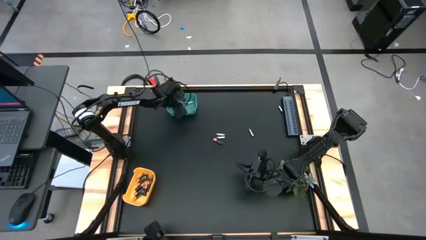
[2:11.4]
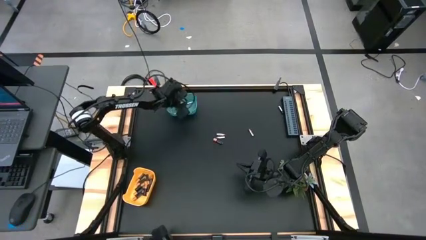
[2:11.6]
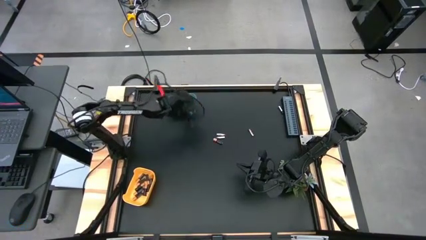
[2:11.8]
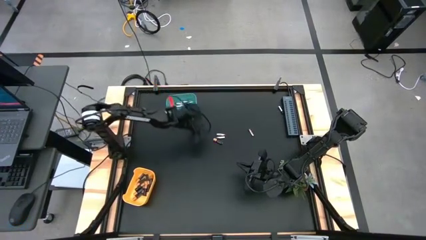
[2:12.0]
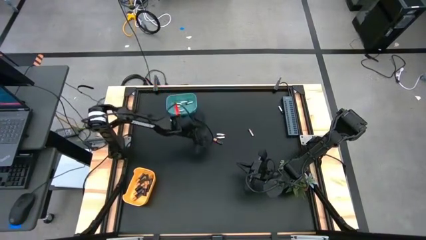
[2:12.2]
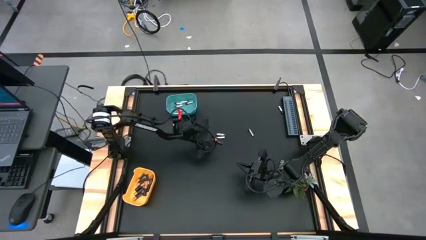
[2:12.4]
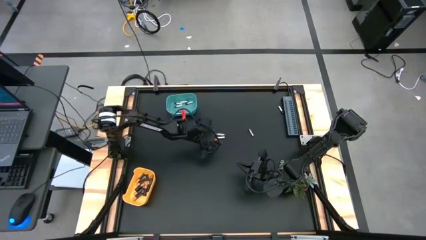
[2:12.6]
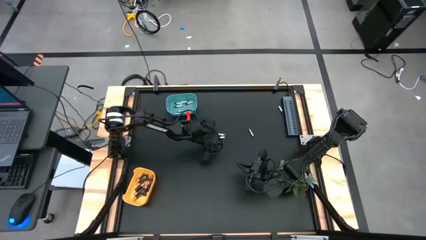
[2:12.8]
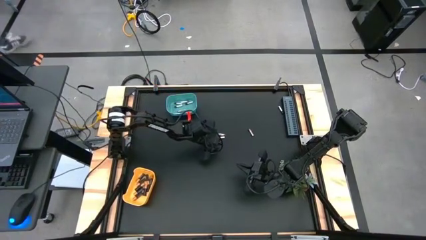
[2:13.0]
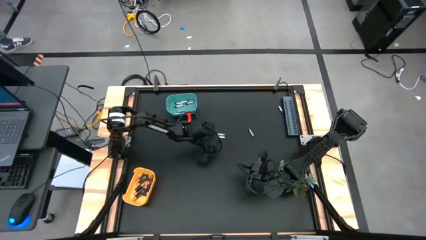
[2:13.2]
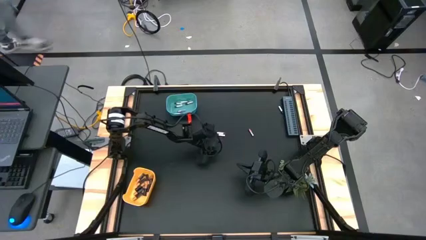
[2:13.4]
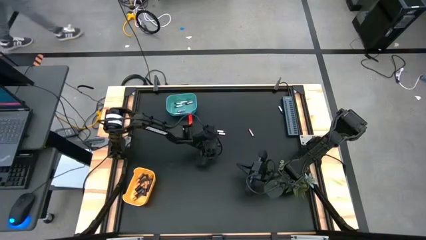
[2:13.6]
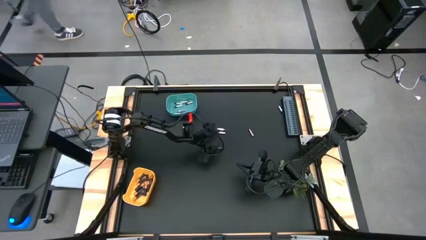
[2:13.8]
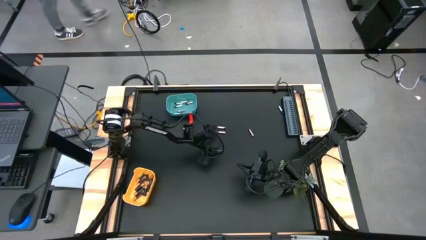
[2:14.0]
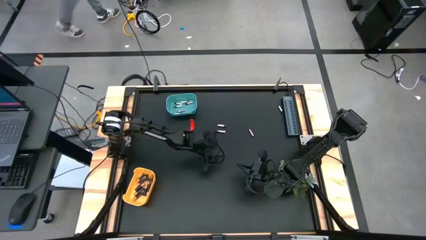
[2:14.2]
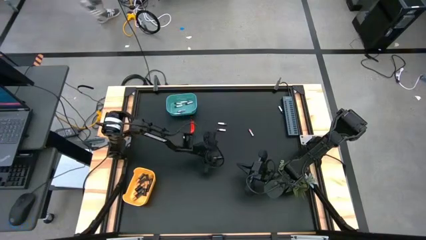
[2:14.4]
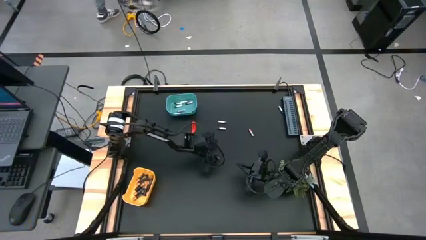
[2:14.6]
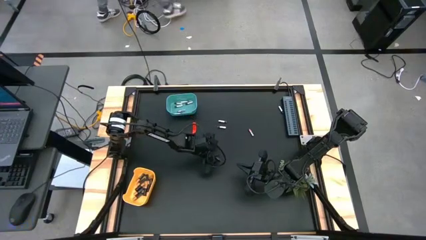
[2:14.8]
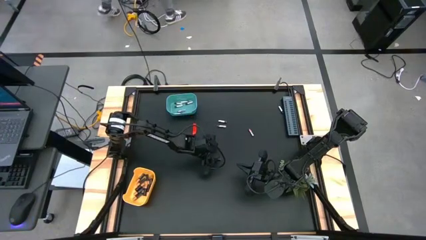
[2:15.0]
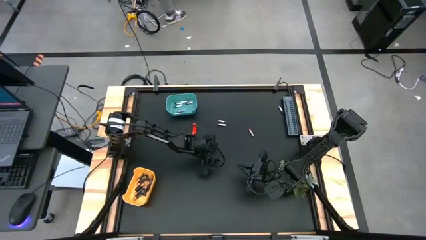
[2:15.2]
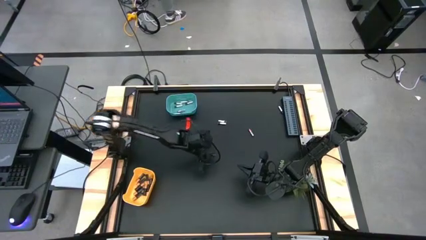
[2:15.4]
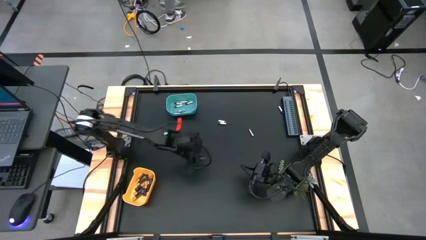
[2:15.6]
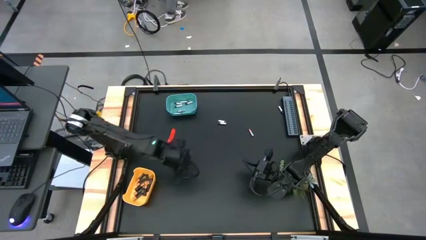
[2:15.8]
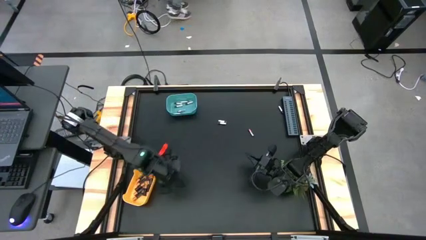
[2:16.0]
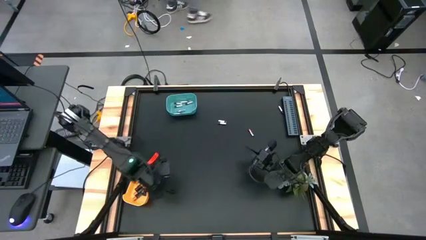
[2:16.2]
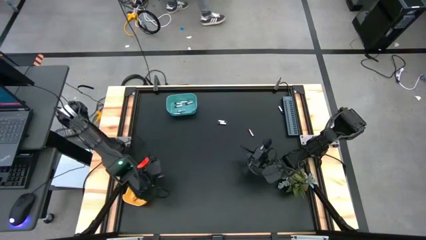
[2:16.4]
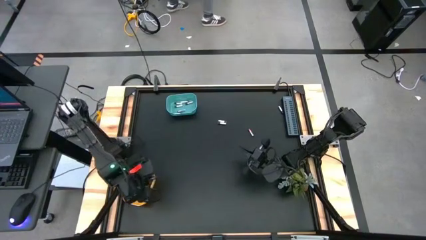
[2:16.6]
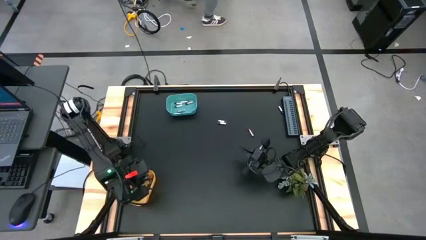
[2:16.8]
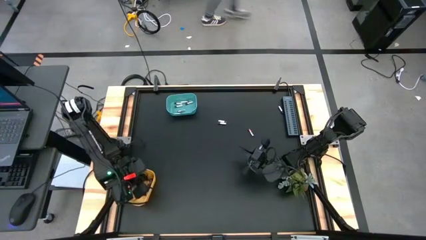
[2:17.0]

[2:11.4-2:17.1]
Task: Sort batteries
Put the black battery into the yellow bin

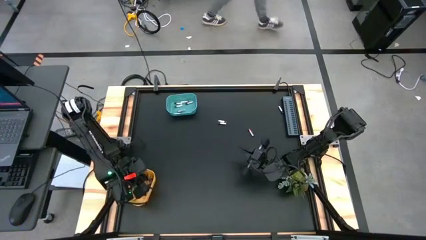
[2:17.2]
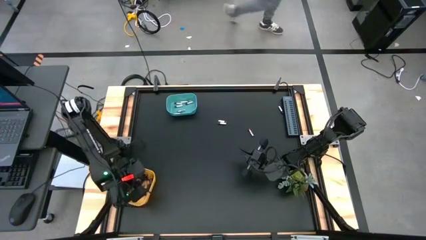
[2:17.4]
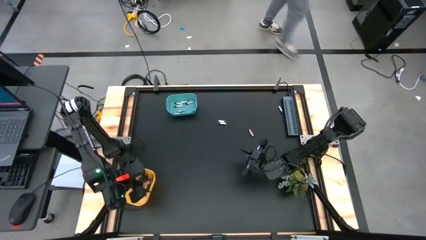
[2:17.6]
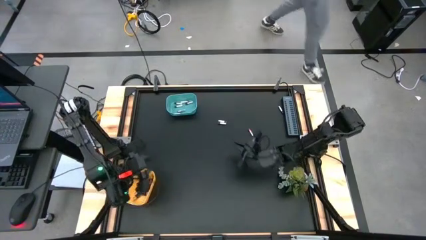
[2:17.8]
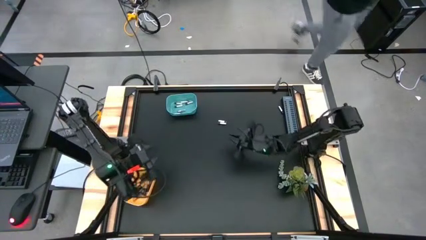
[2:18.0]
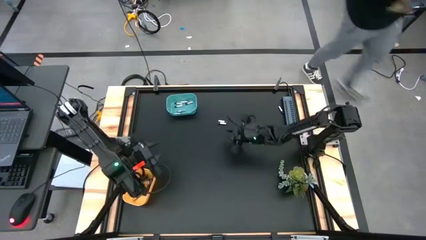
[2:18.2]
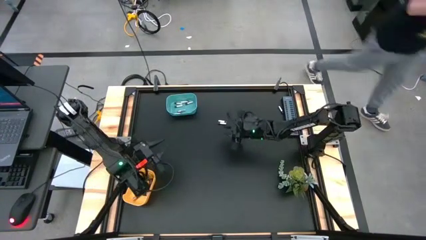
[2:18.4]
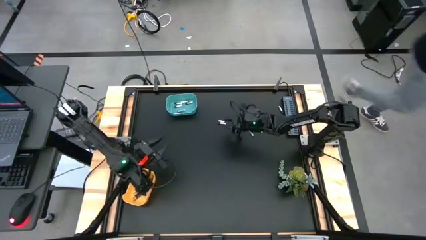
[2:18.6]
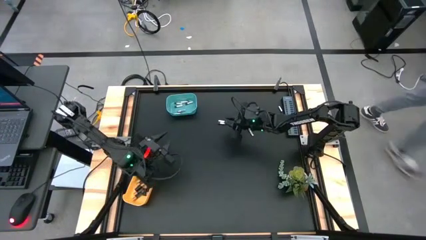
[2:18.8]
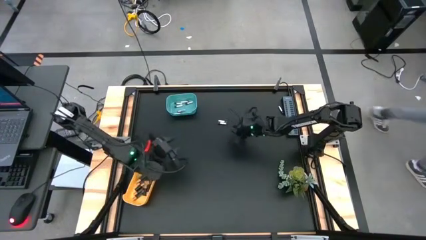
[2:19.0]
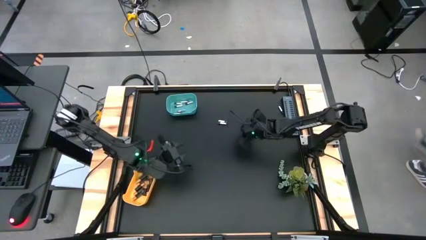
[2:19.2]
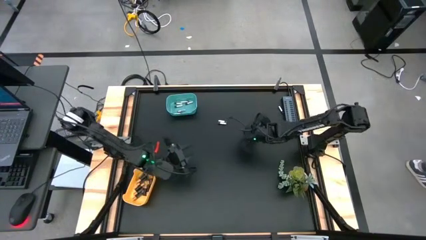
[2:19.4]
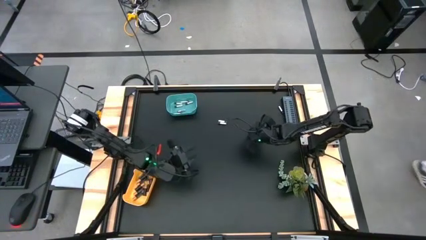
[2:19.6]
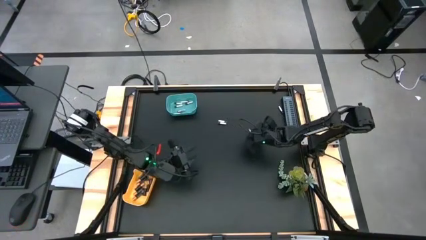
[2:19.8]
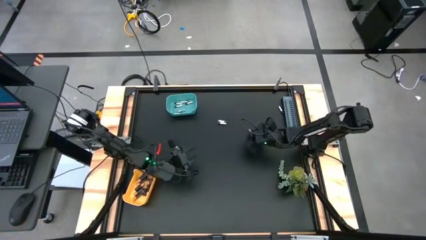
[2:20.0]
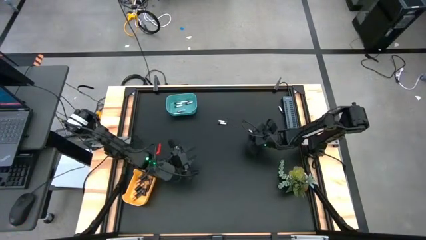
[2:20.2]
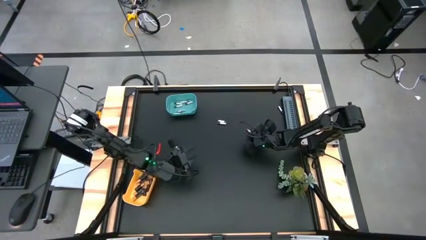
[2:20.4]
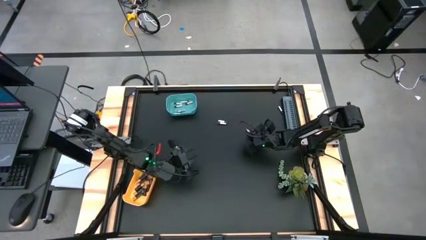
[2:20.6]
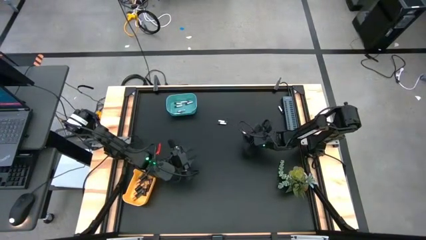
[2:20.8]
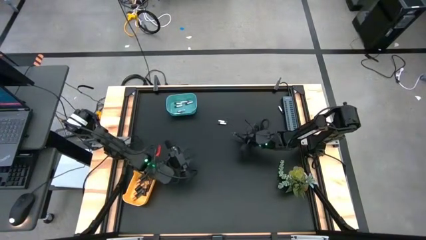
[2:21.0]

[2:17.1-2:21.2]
Put the silver battery into the green bin

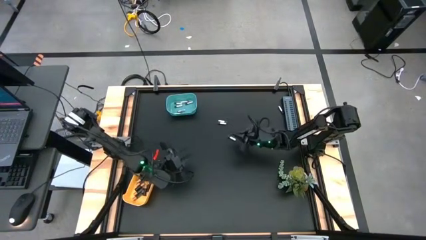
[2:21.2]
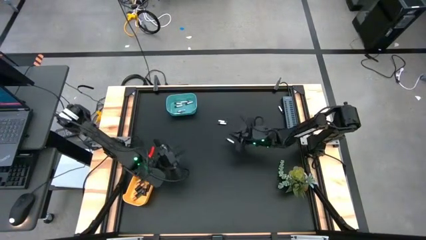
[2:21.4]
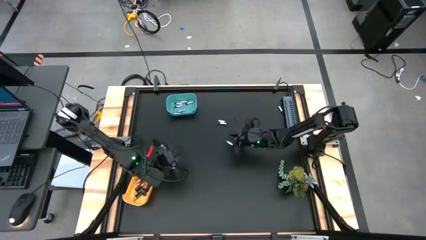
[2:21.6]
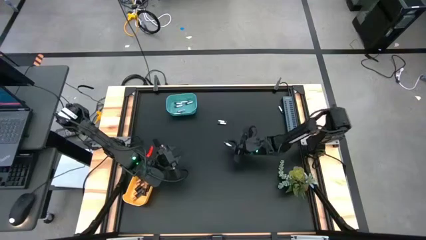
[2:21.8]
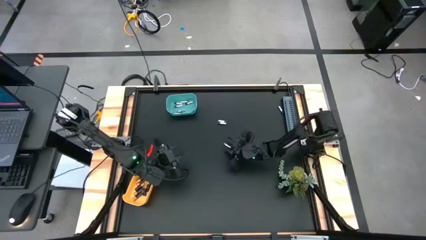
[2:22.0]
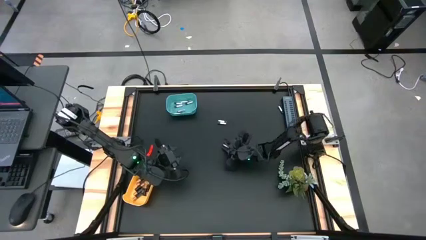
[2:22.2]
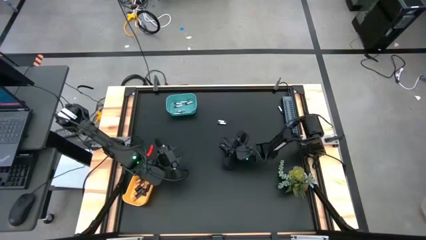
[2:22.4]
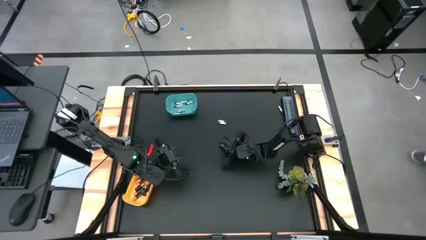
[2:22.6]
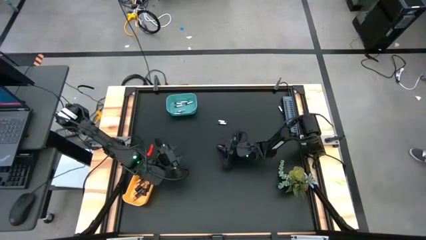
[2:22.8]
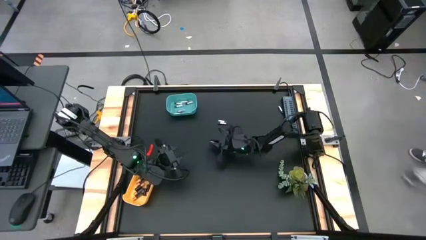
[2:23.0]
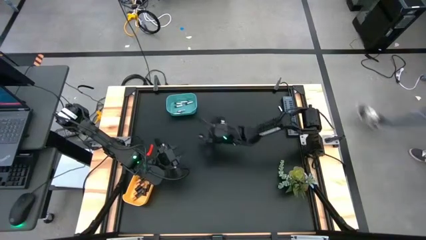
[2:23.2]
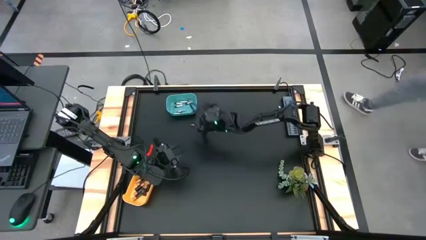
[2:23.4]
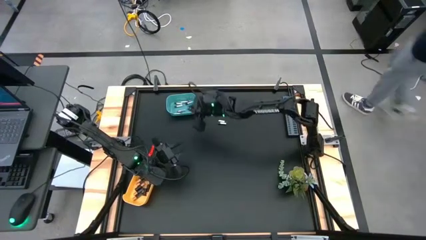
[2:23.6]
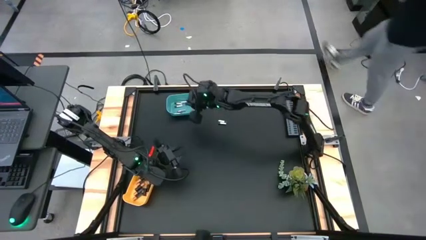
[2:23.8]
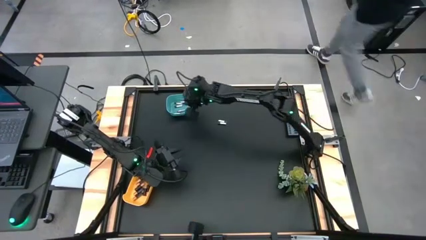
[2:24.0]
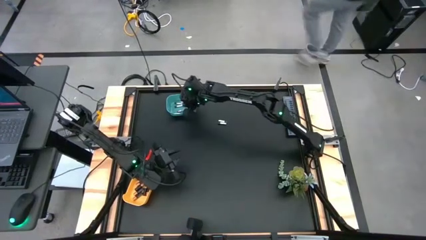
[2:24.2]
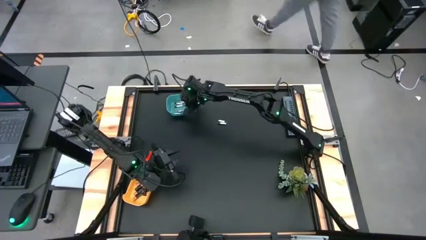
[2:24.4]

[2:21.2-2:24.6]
Put the silver battery into the green bin

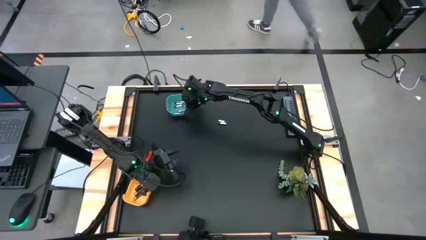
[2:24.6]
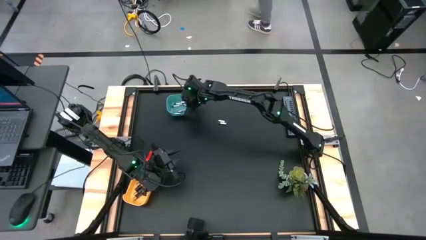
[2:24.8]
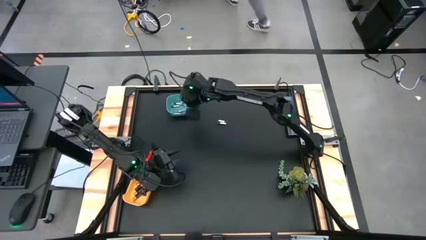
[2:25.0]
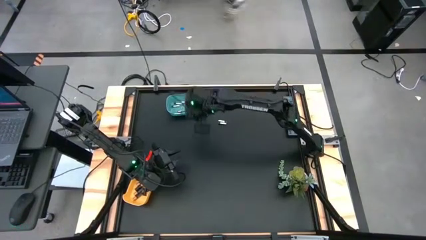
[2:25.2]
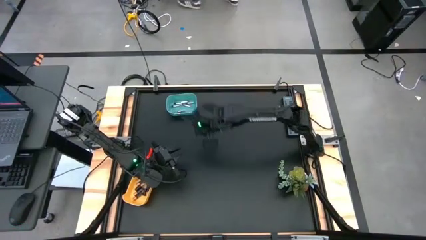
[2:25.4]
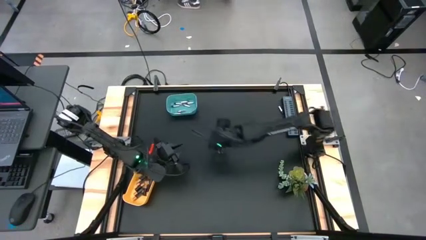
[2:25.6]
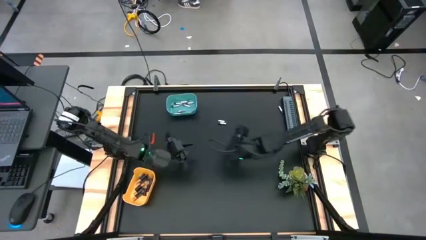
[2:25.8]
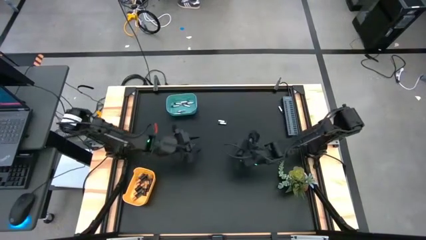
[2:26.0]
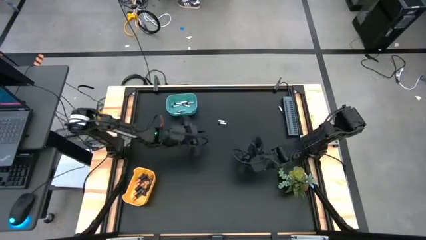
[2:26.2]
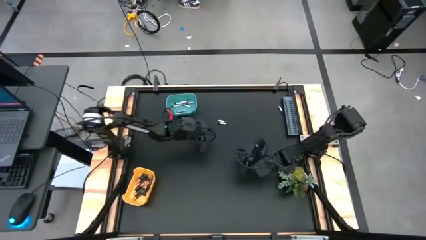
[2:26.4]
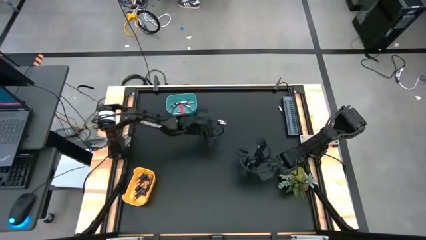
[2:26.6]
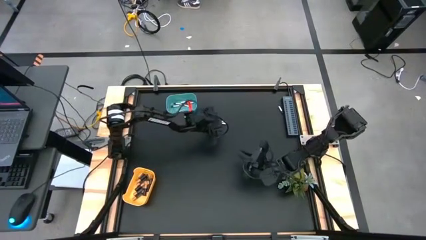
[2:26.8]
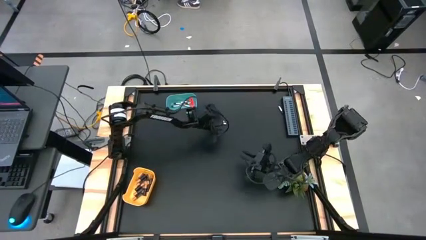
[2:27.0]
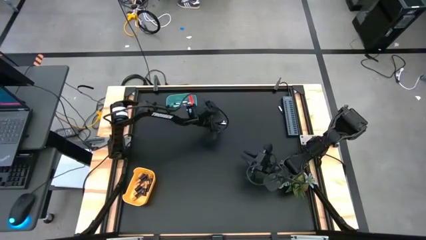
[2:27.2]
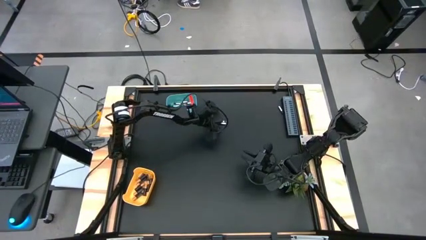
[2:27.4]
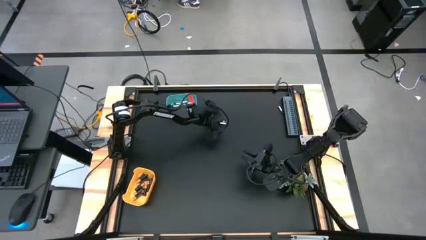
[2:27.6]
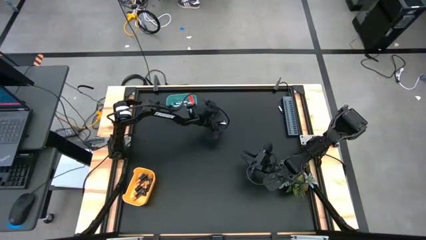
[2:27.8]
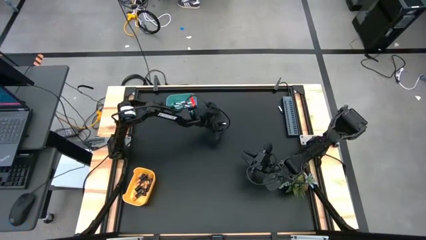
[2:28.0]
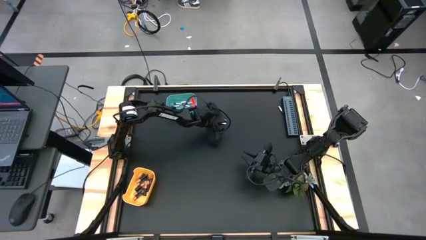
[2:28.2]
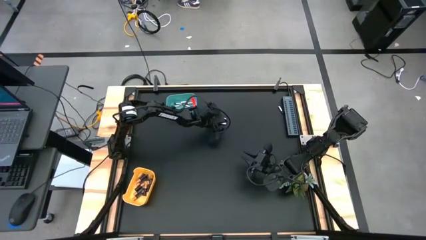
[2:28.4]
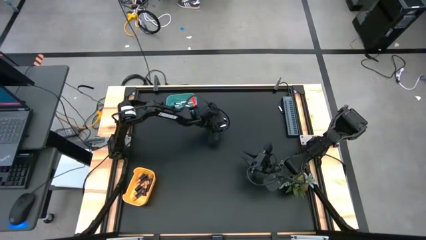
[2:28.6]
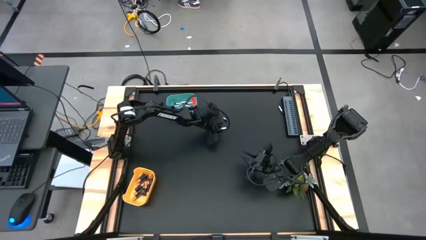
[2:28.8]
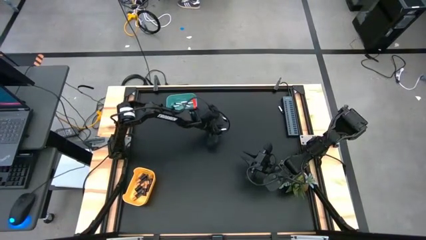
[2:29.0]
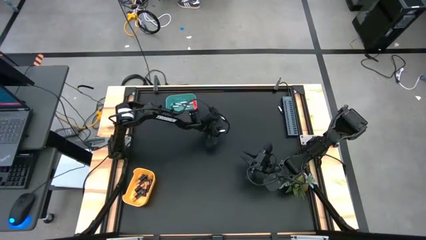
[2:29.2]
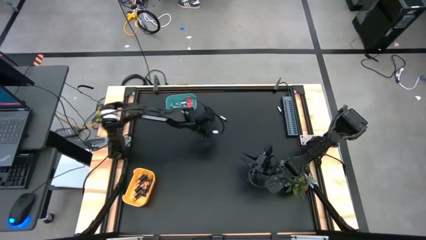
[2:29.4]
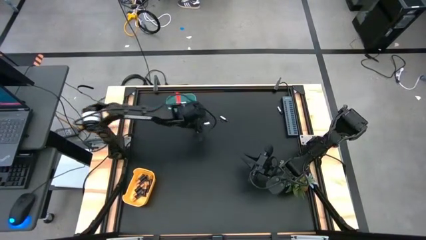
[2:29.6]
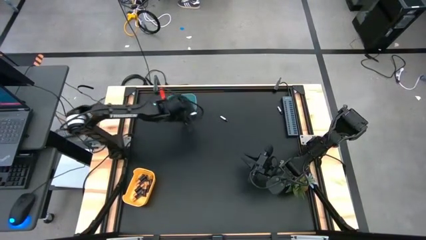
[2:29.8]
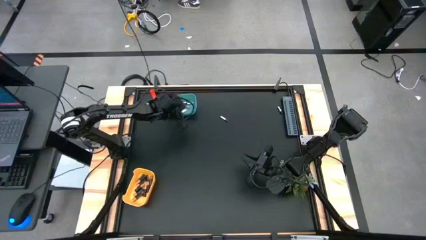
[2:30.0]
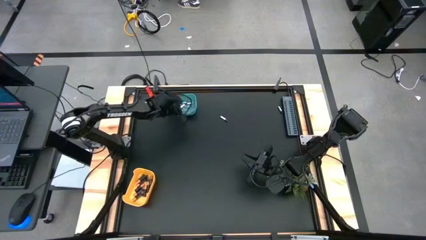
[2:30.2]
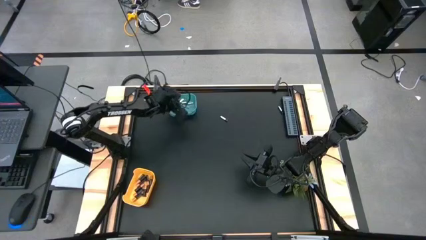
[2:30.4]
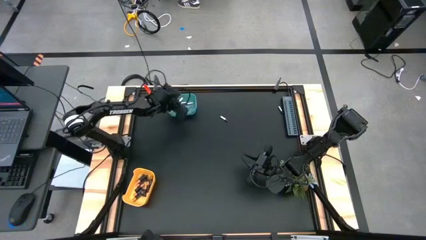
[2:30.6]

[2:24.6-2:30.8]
Put the silver battery into the green bin
